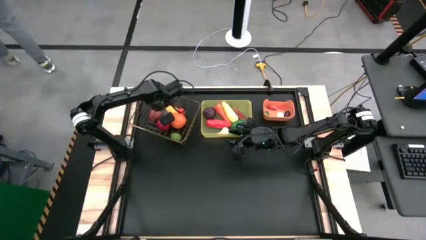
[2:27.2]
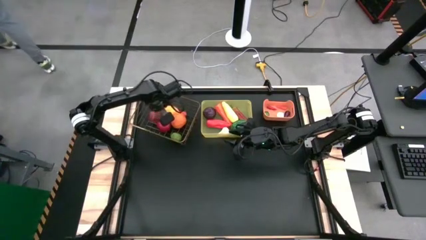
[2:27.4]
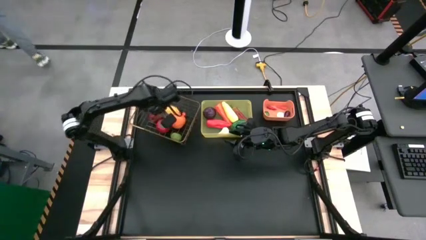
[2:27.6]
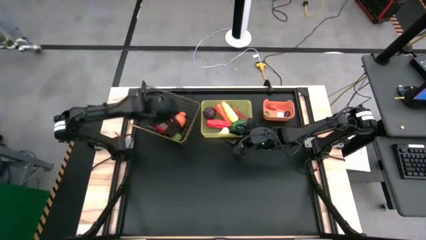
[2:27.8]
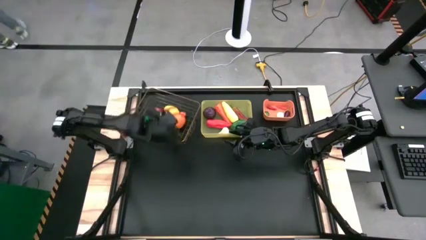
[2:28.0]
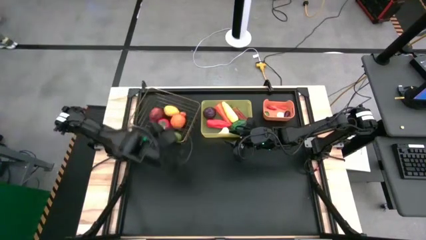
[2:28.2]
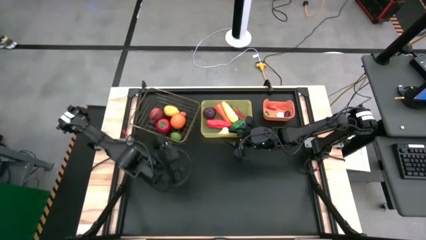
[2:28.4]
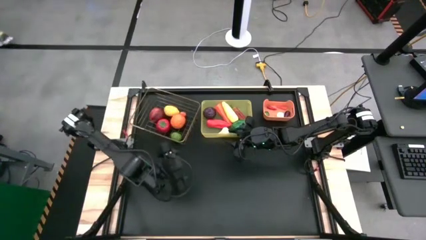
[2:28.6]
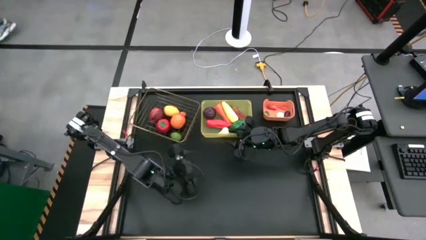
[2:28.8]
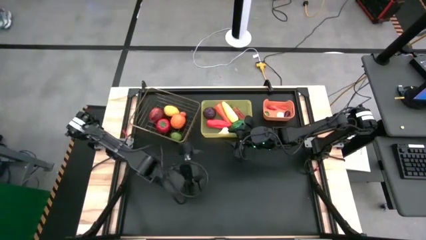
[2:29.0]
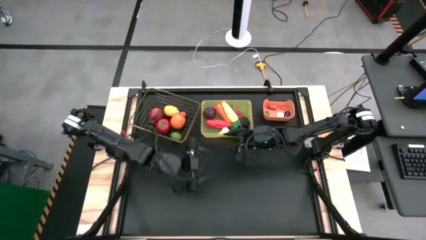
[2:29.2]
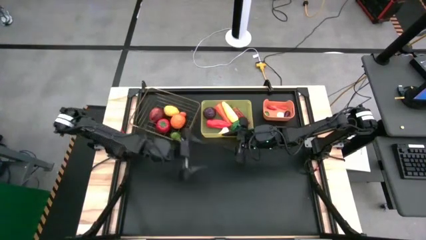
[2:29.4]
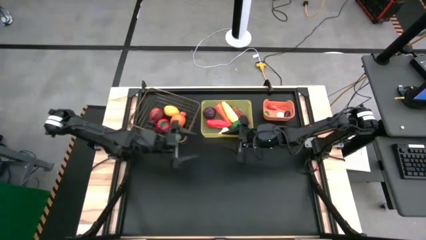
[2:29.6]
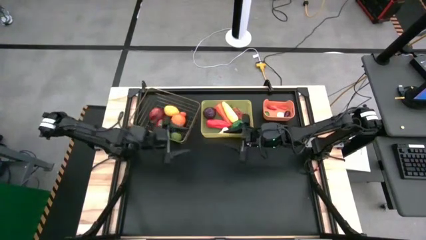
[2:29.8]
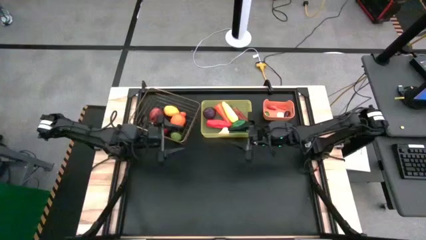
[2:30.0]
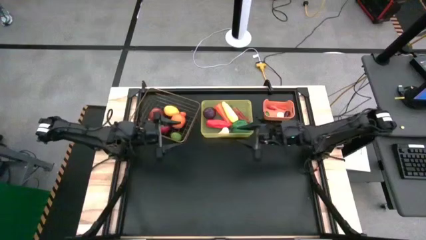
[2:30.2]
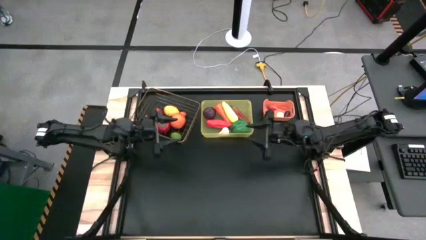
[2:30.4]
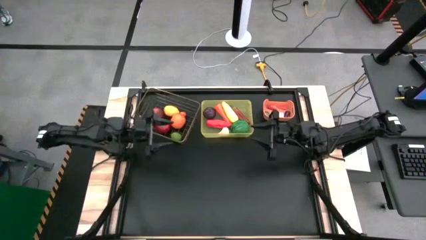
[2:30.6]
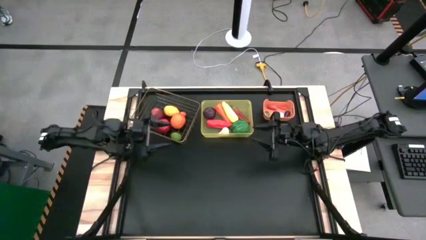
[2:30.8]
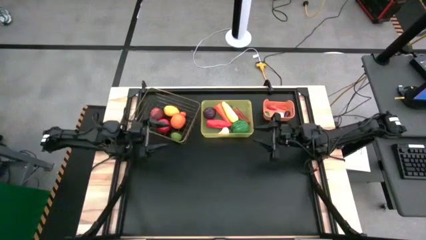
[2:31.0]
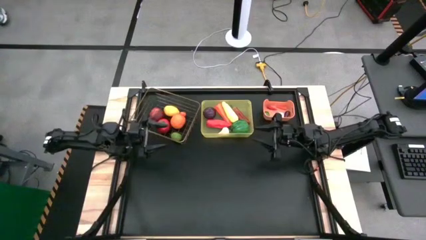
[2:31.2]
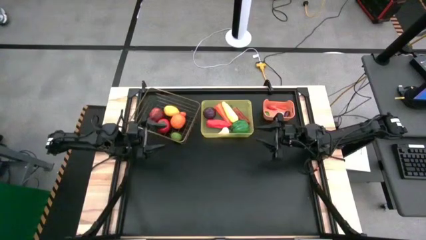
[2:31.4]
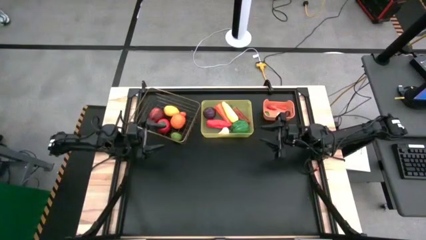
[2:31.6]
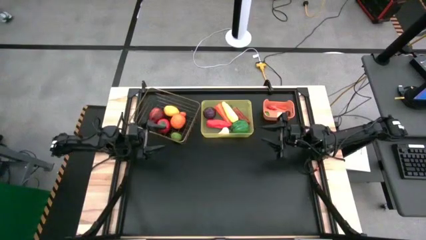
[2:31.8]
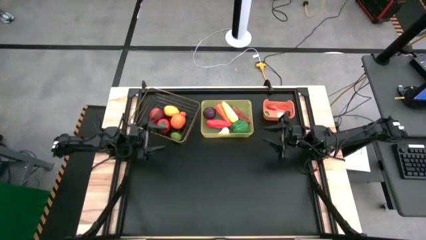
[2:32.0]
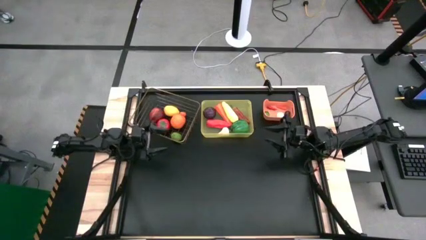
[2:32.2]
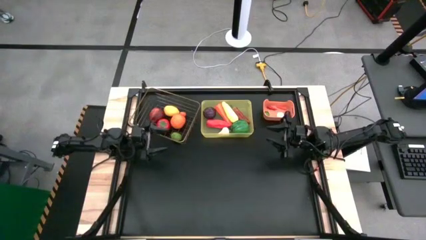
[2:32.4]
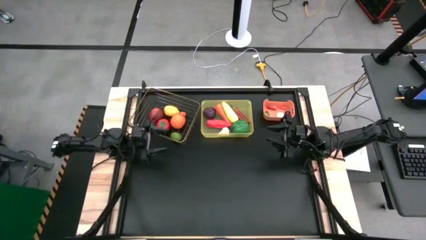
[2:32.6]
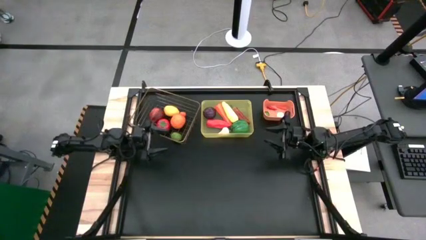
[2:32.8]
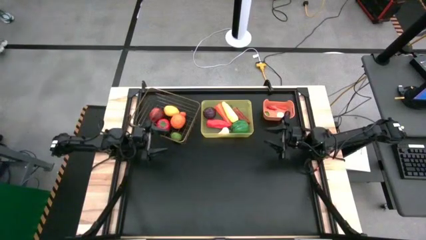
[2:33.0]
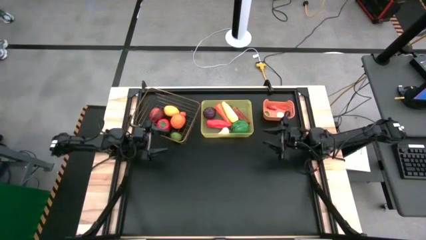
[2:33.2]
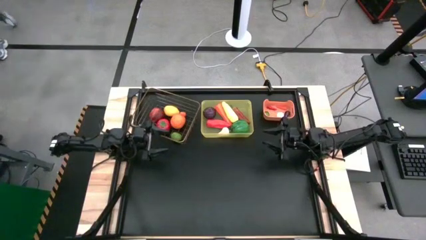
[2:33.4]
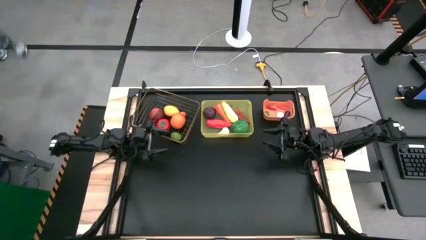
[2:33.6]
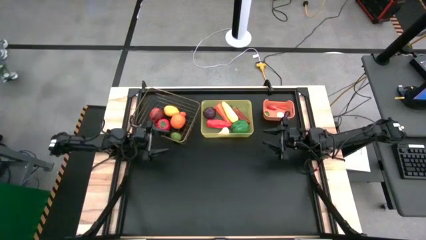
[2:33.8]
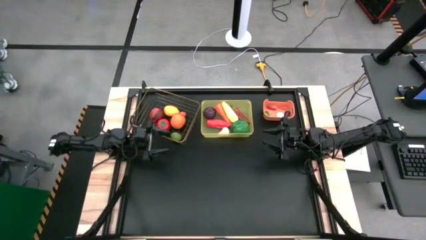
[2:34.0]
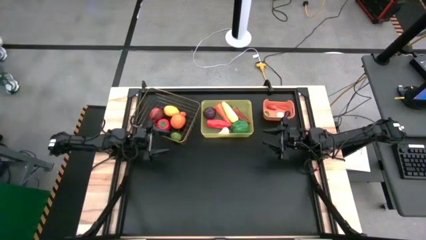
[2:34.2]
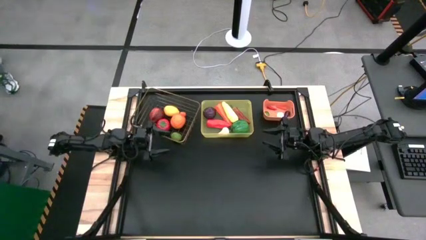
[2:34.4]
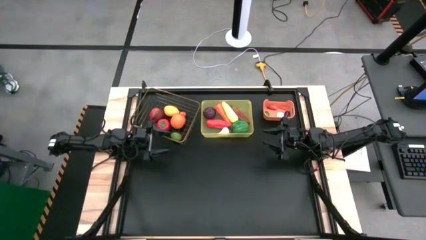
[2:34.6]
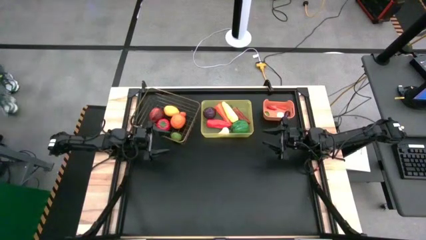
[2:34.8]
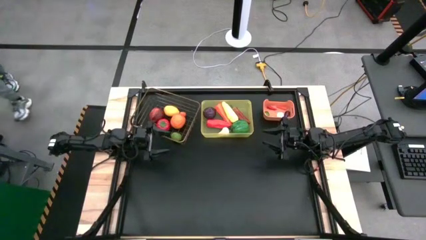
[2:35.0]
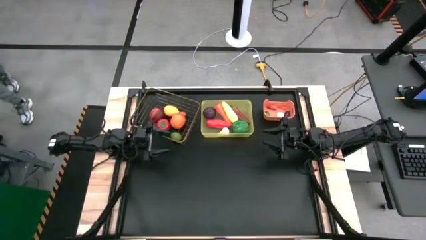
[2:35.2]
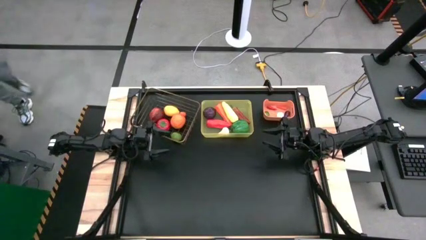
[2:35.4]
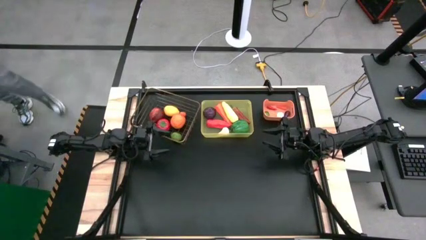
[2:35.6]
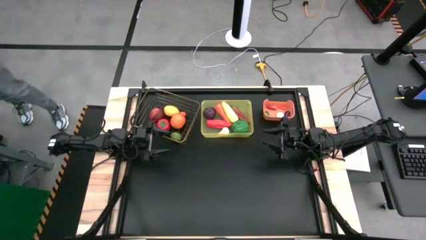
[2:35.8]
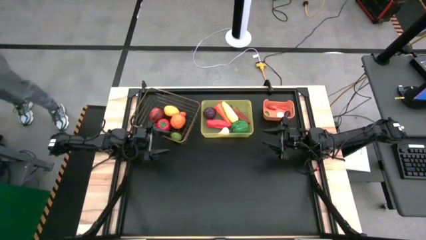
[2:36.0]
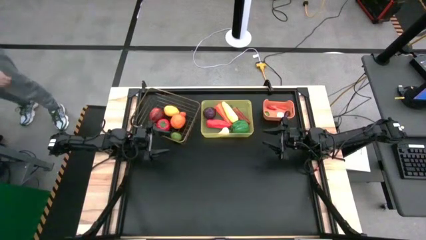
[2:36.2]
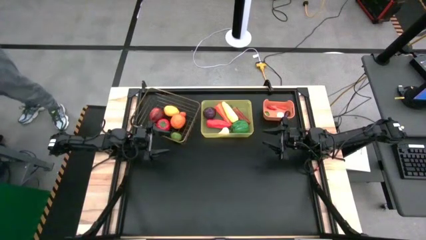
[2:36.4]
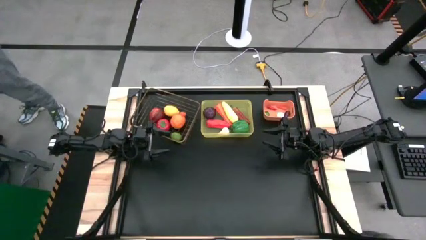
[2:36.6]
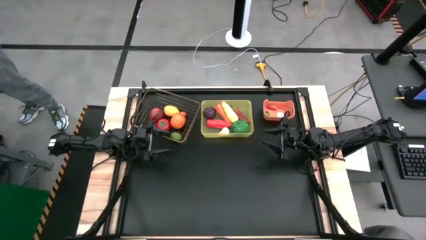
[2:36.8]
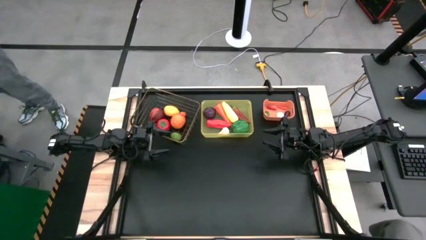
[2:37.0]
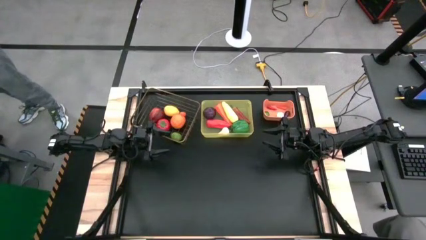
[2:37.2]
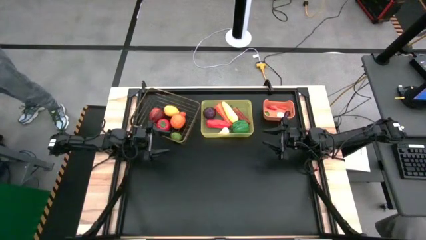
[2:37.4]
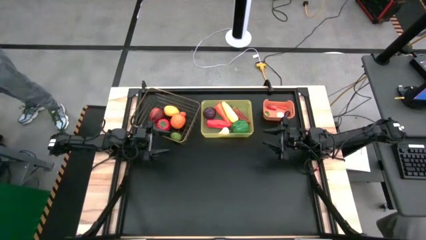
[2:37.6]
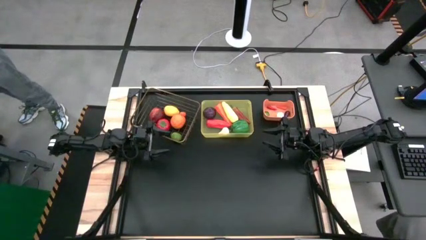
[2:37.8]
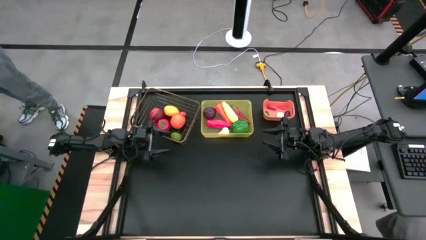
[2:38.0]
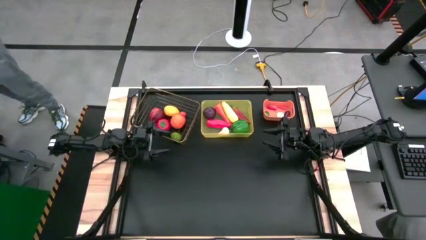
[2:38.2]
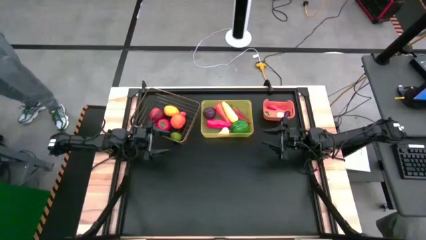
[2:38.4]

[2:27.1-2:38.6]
Task: Sort produce into baskets
Return to Home Position
